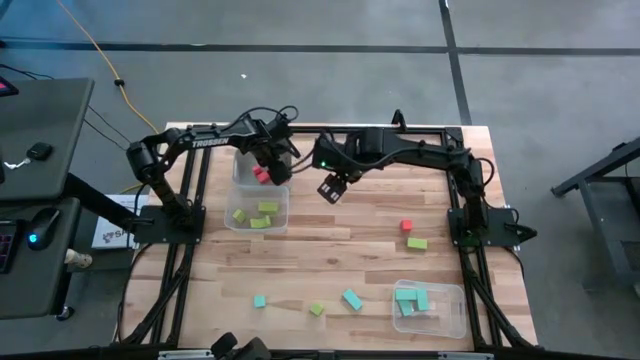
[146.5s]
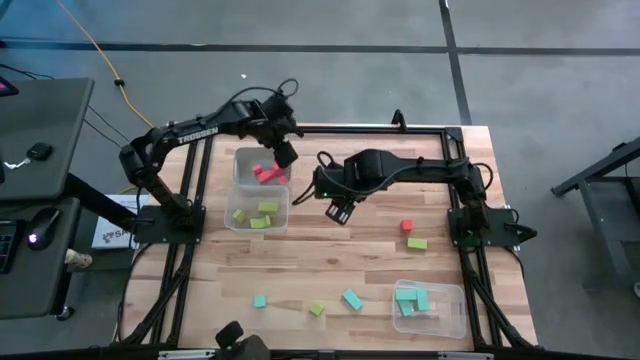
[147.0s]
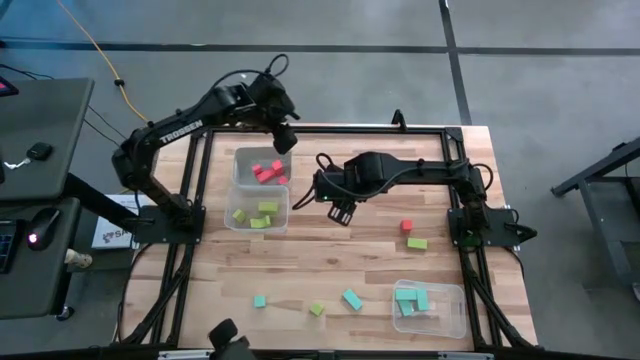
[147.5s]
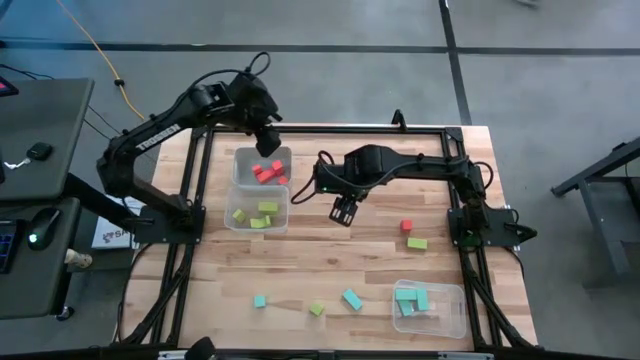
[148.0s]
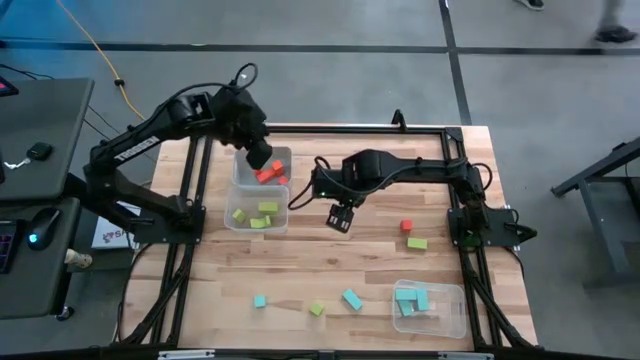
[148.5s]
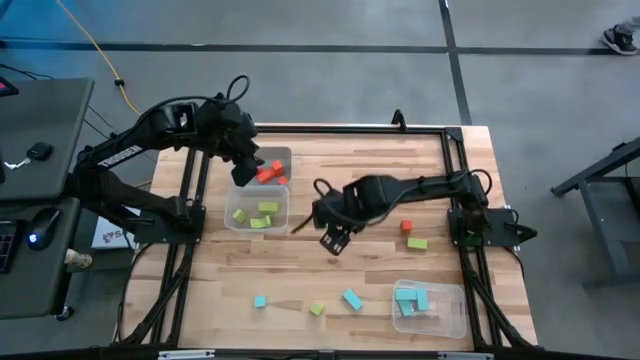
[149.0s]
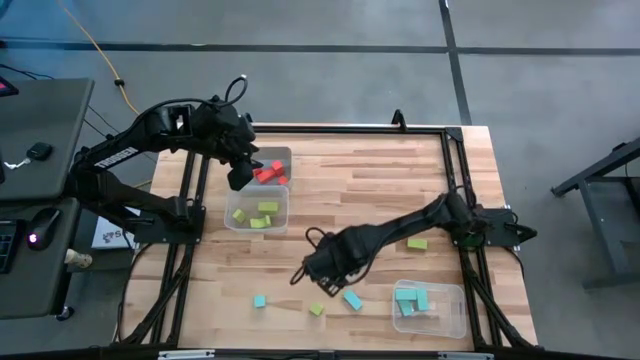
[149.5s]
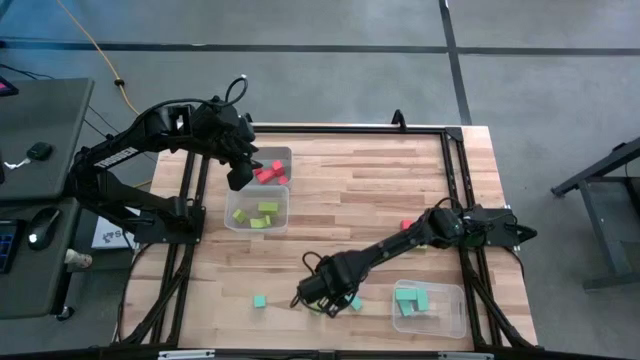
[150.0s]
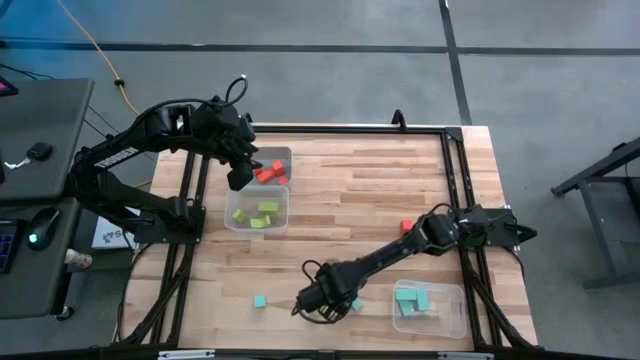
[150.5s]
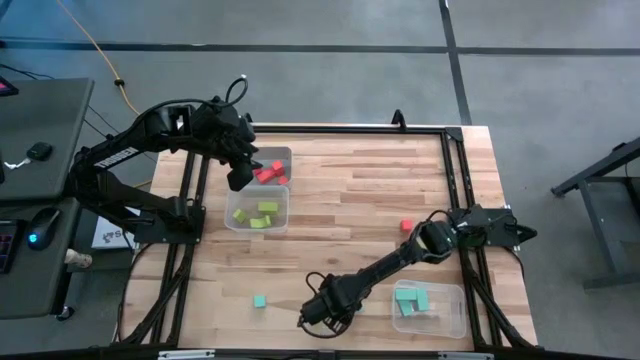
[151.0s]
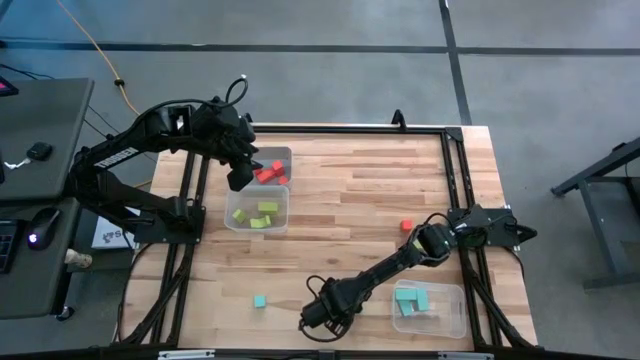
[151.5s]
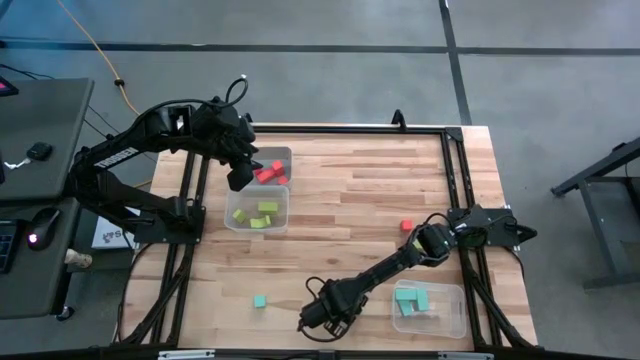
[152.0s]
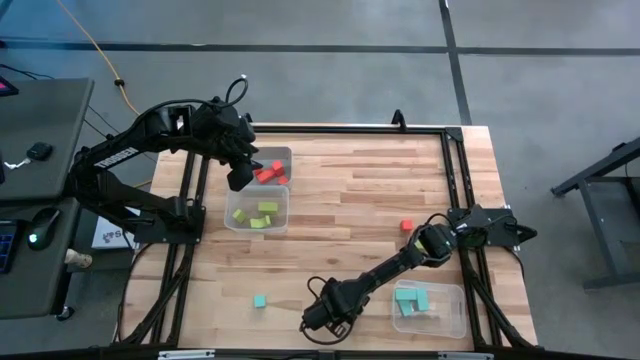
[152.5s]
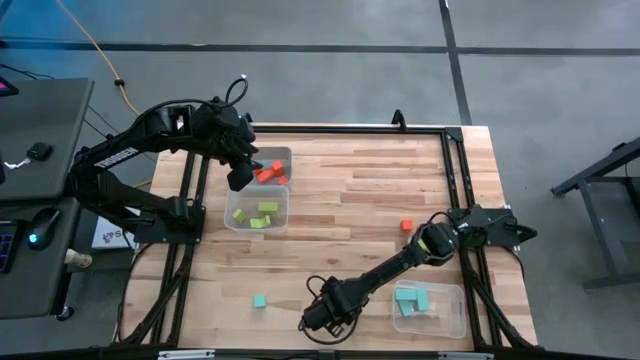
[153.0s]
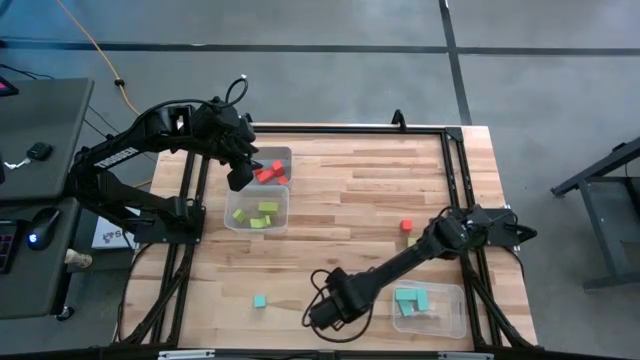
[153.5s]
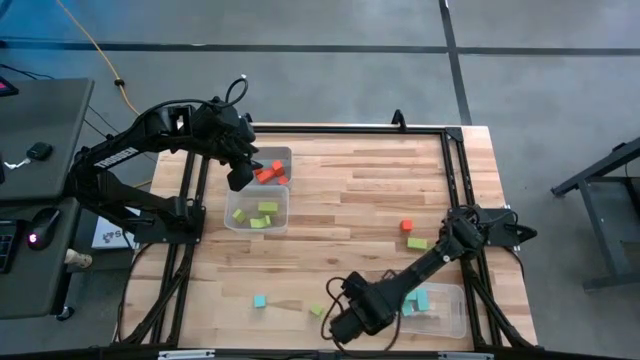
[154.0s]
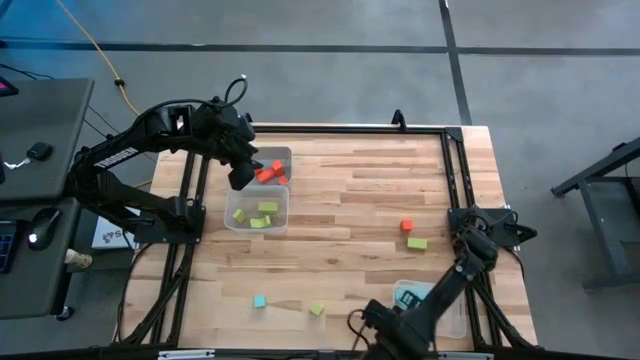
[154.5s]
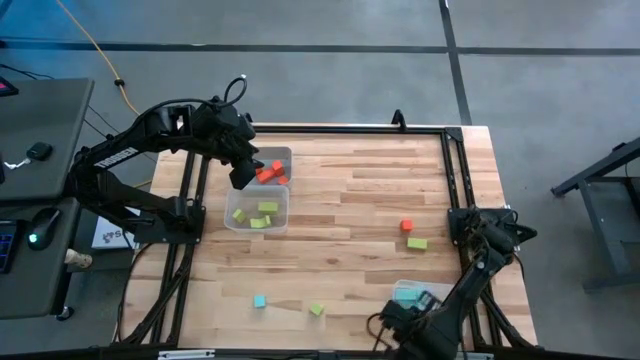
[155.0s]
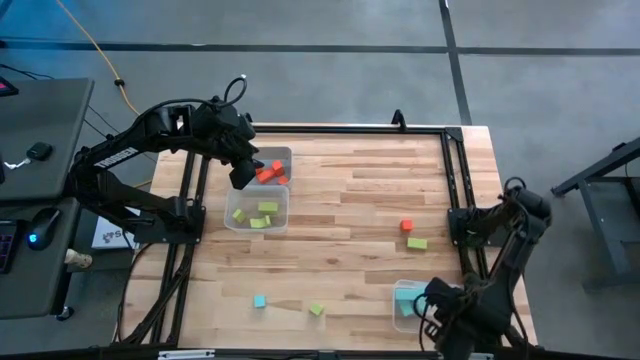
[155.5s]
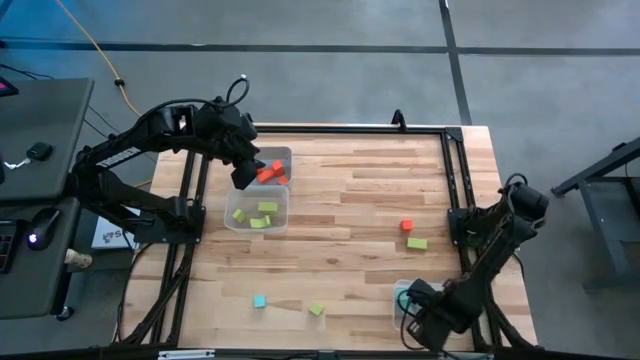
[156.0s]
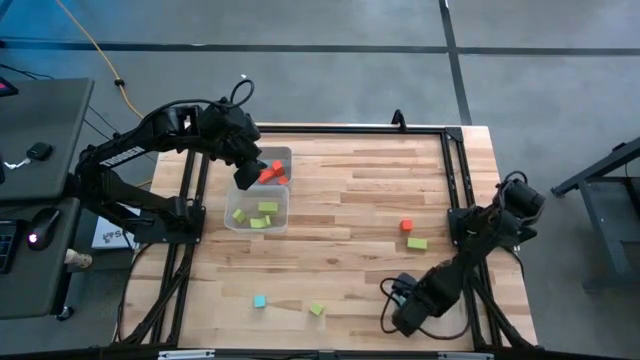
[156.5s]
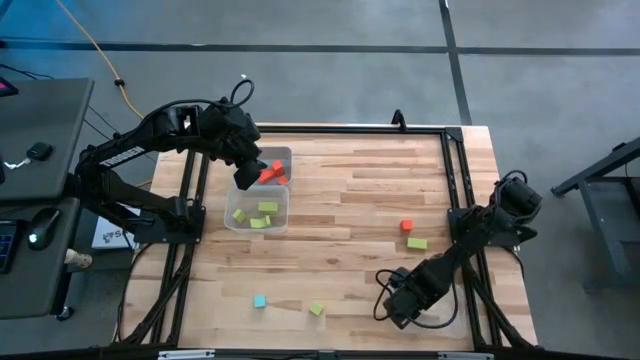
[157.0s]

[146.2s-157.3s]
Task: Sort & place blocks by color
Put the blue block into the bottom transparent bin

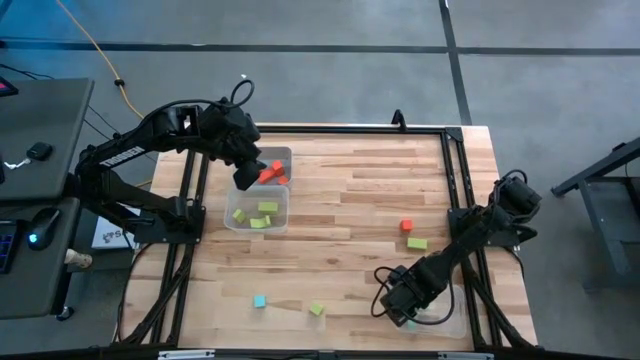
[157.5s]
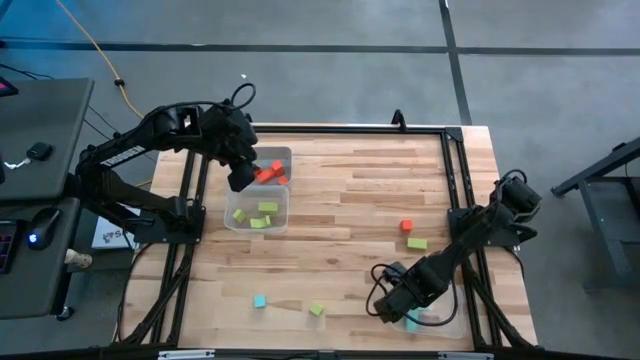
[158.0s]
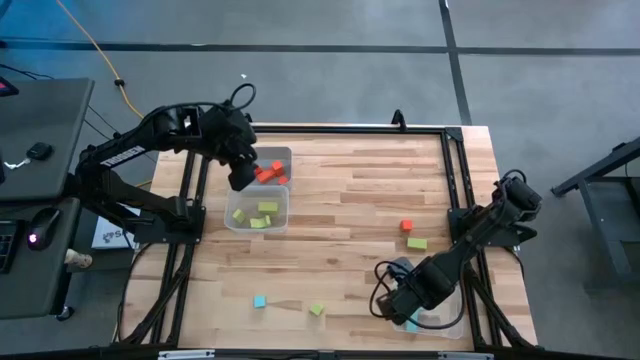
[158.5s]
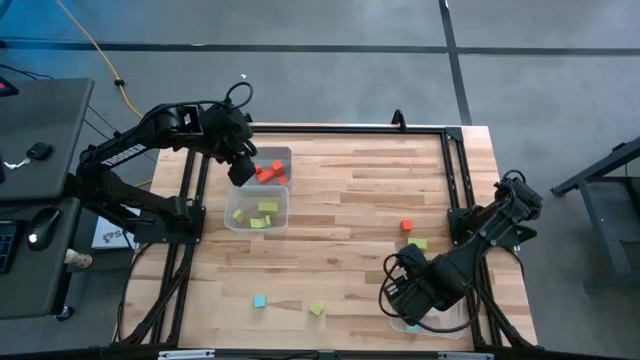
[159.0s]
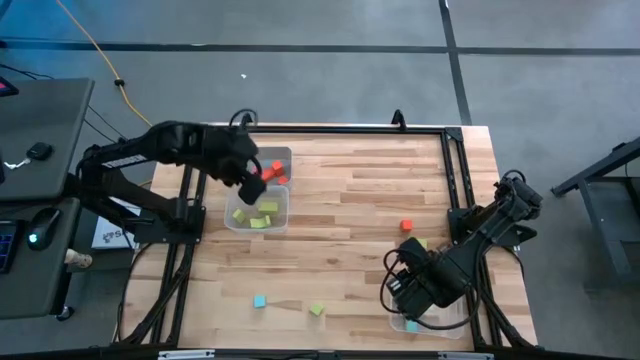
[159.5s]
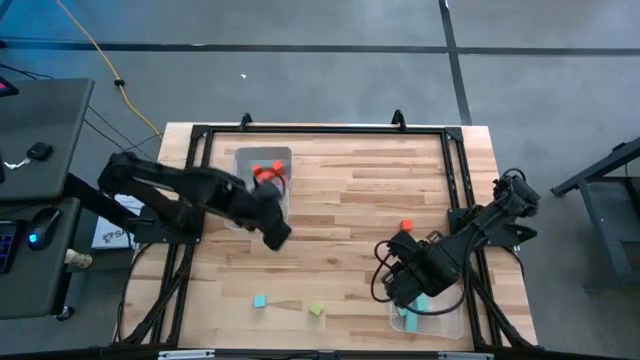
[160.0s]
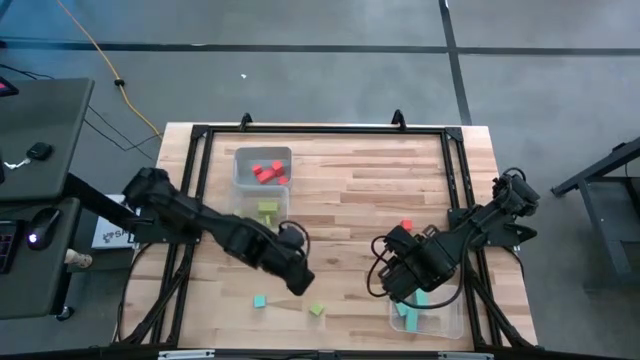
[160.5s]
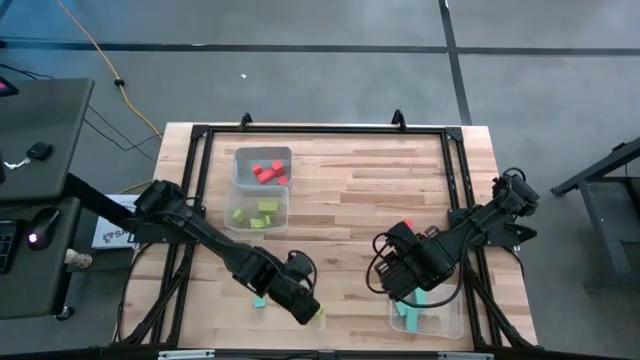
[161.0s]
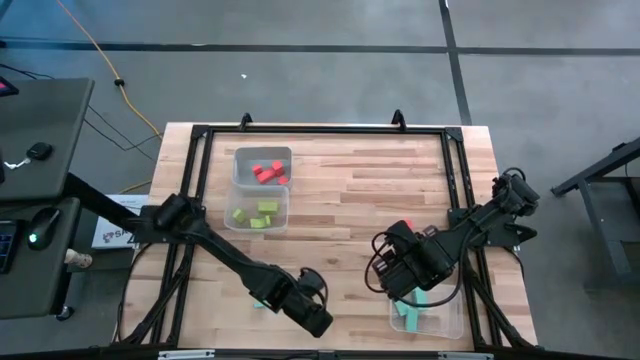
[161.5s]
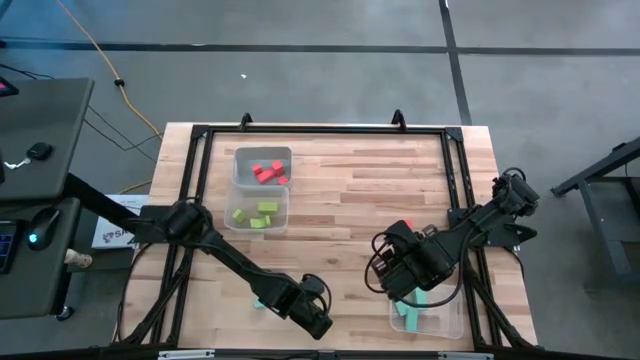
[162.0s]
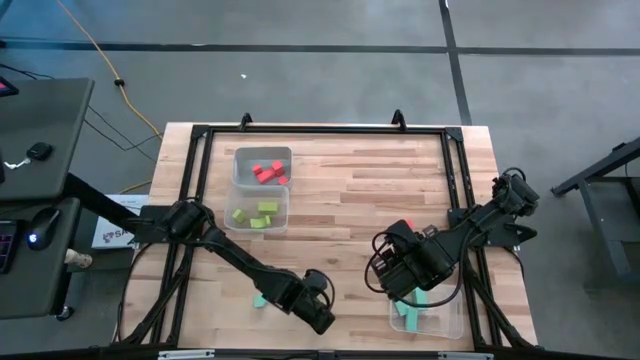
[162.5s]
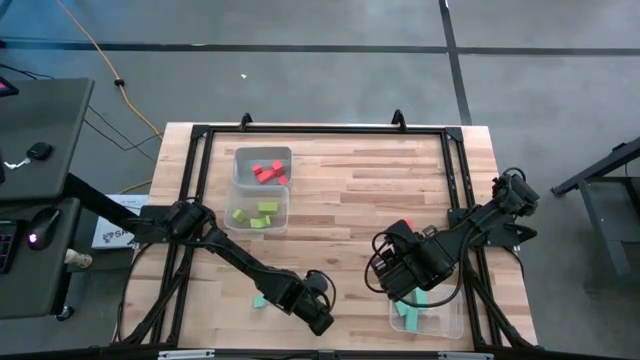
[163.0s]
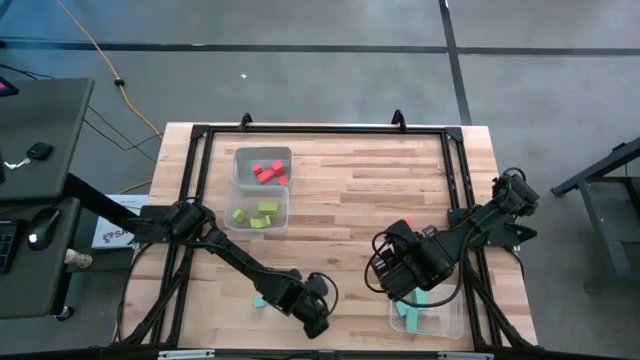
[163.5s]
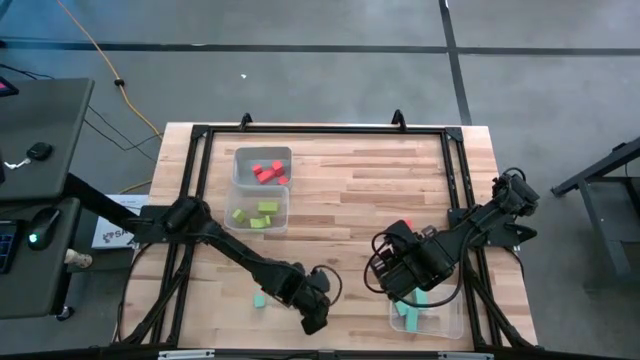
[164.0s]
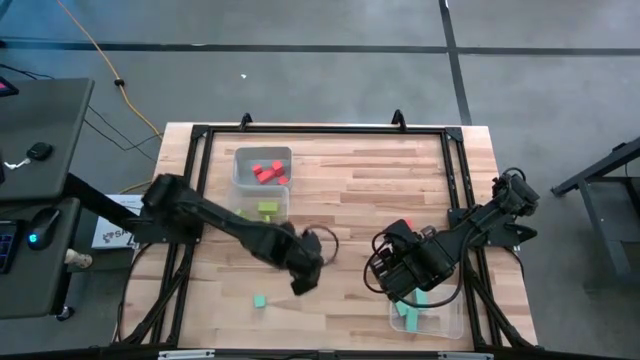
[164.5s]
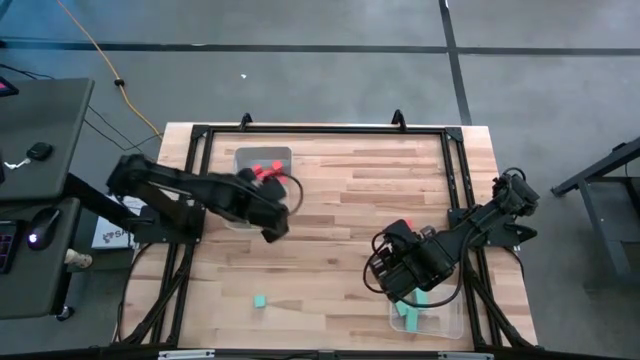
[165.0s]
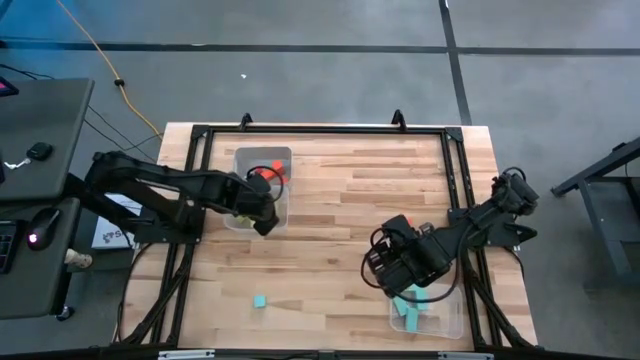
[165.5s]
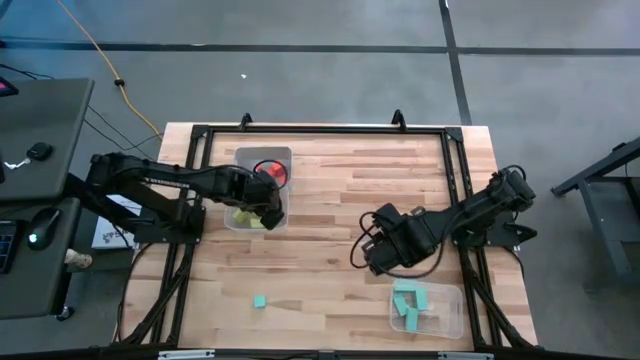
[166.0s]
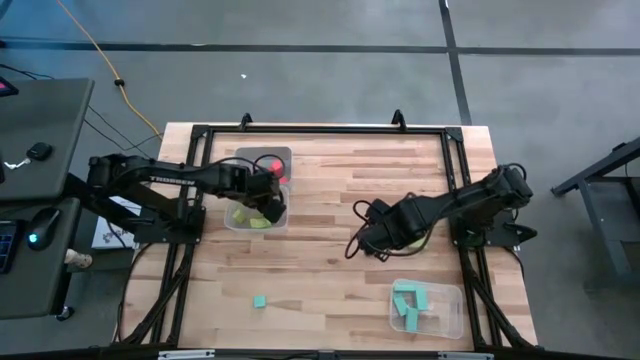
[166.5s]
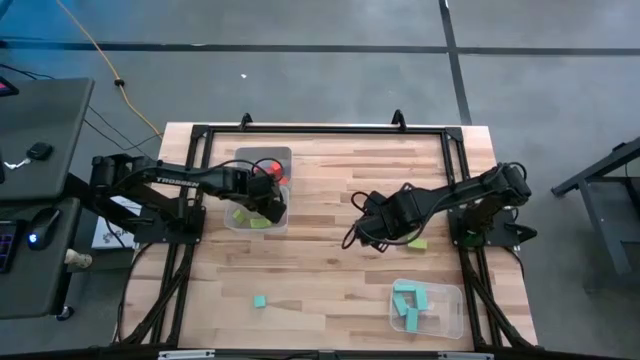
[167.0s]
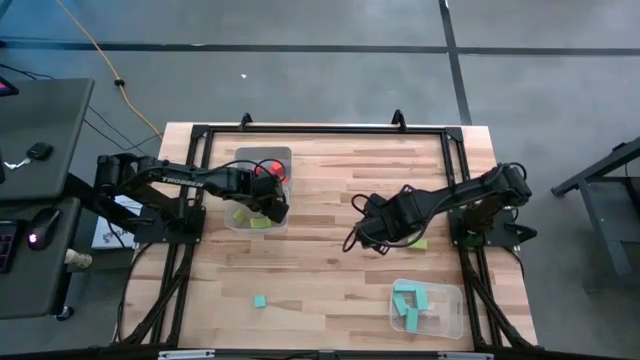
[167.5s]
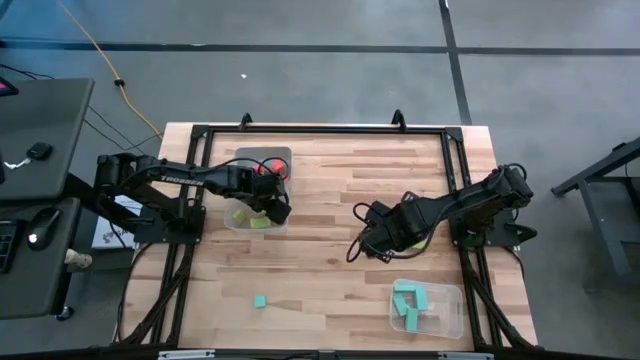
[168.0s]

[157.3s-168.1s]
Put the green block into the top transparent bin
